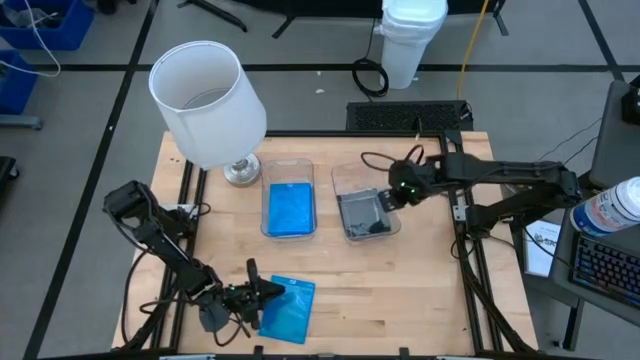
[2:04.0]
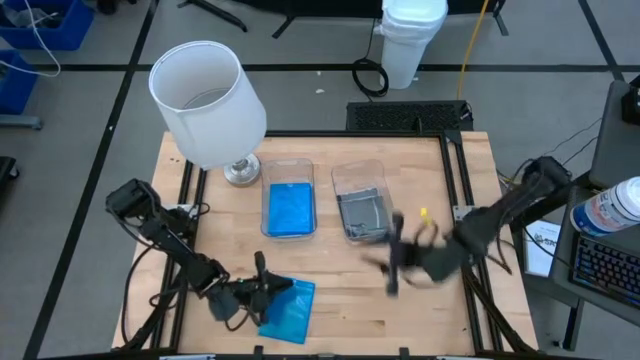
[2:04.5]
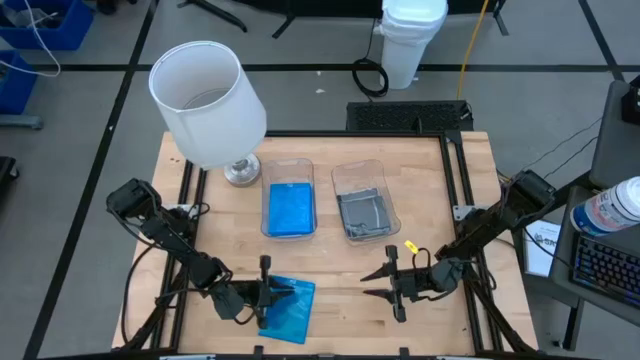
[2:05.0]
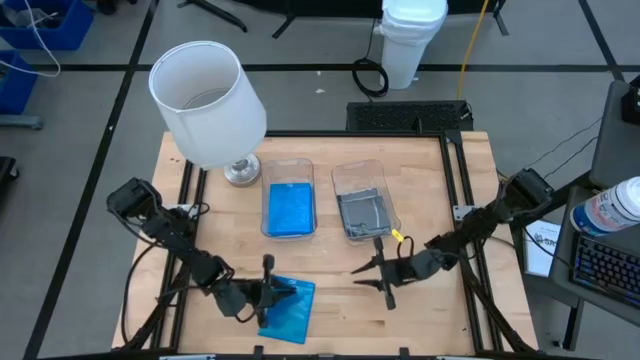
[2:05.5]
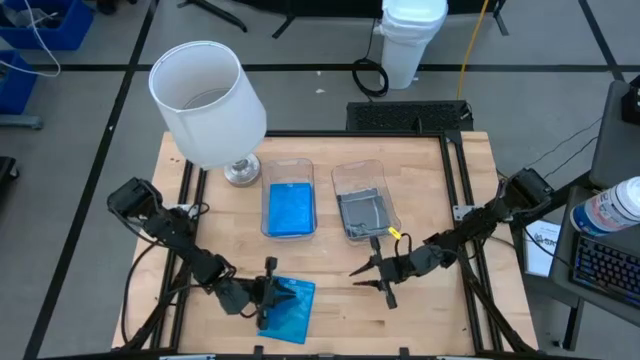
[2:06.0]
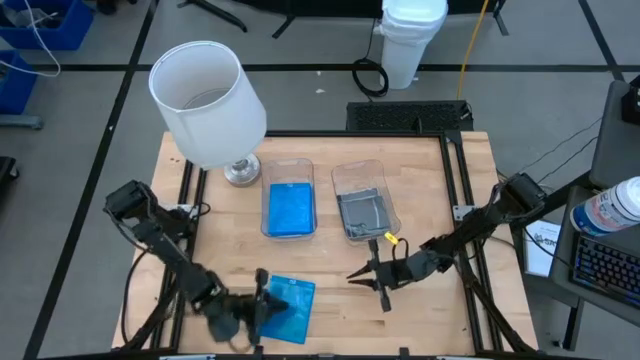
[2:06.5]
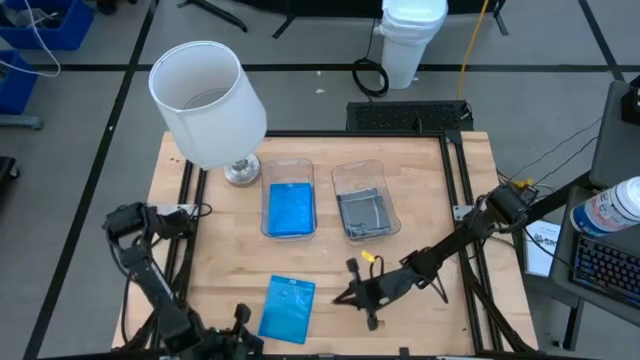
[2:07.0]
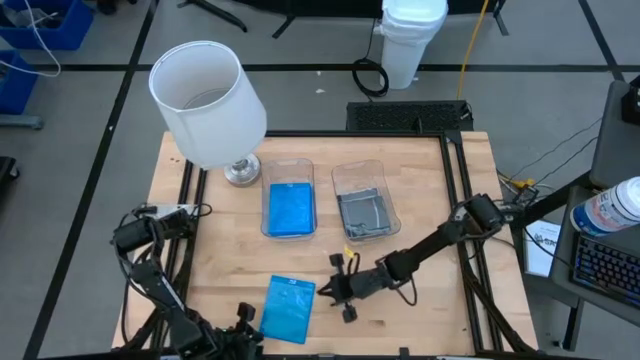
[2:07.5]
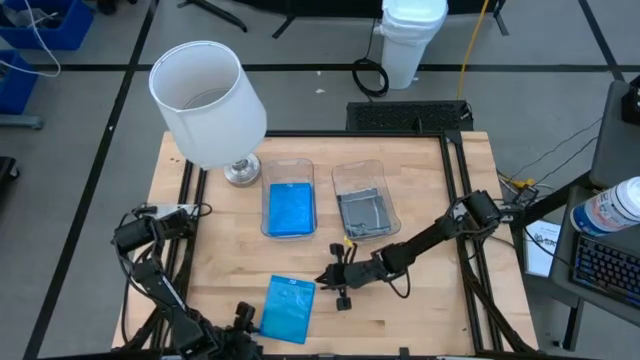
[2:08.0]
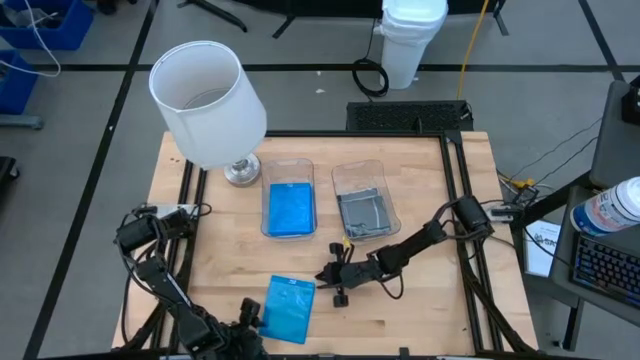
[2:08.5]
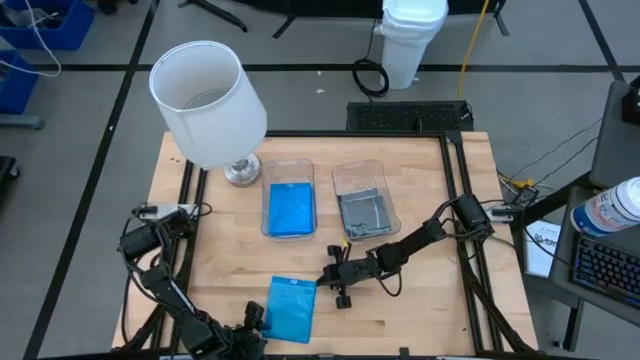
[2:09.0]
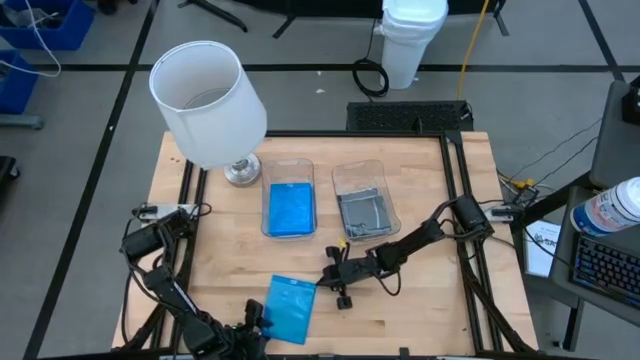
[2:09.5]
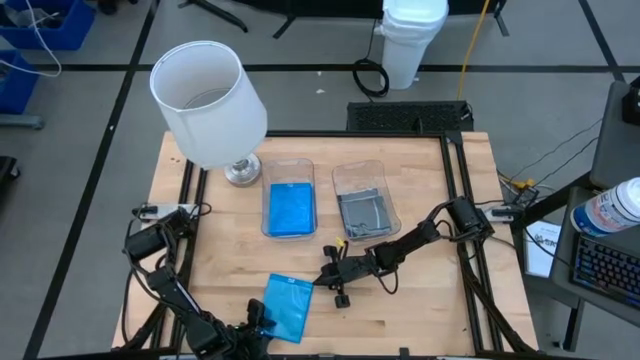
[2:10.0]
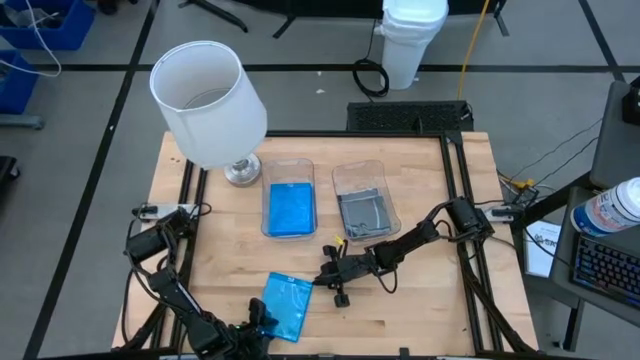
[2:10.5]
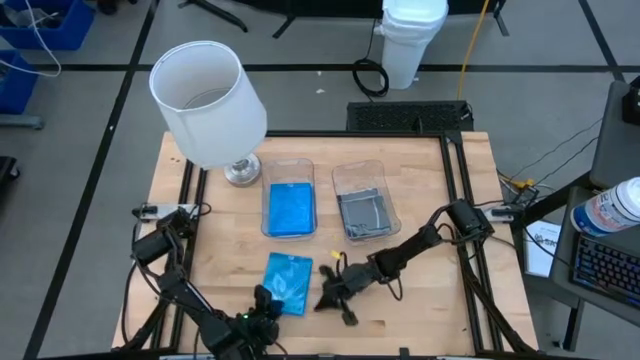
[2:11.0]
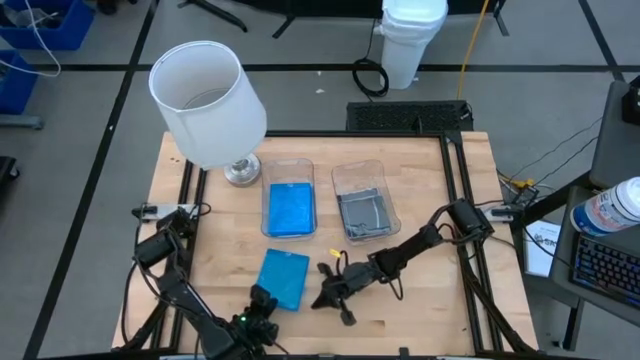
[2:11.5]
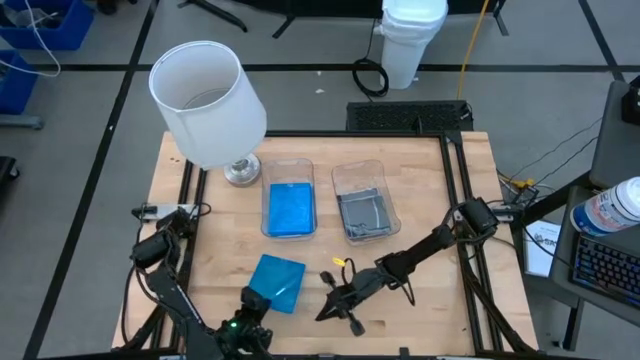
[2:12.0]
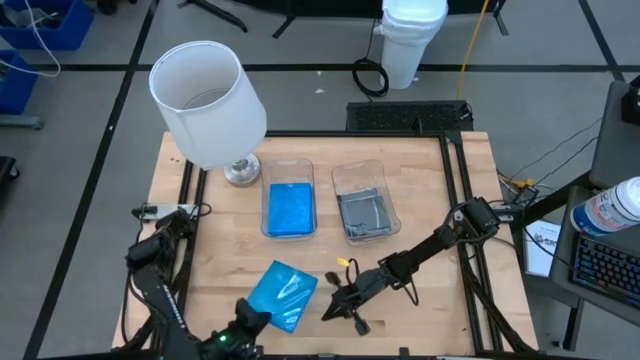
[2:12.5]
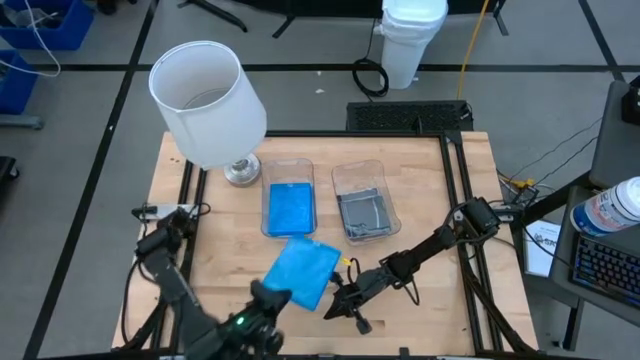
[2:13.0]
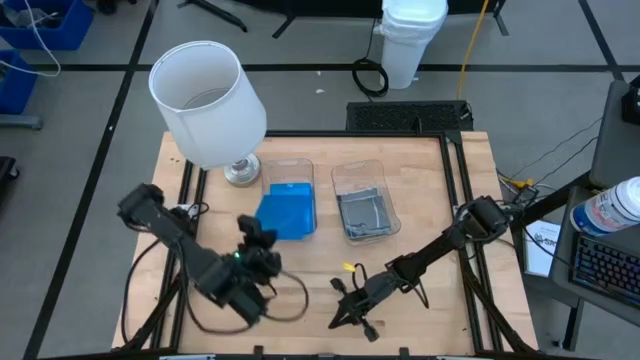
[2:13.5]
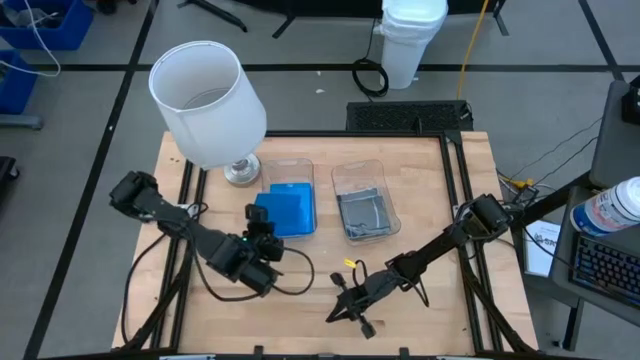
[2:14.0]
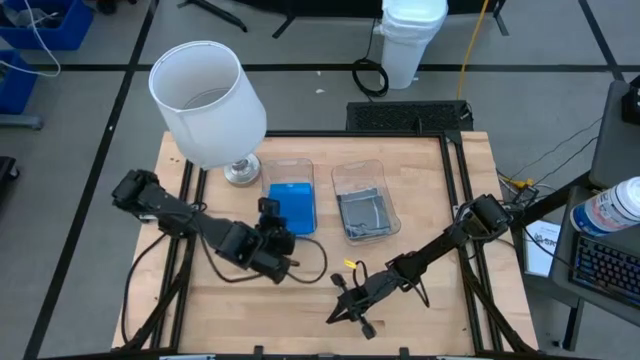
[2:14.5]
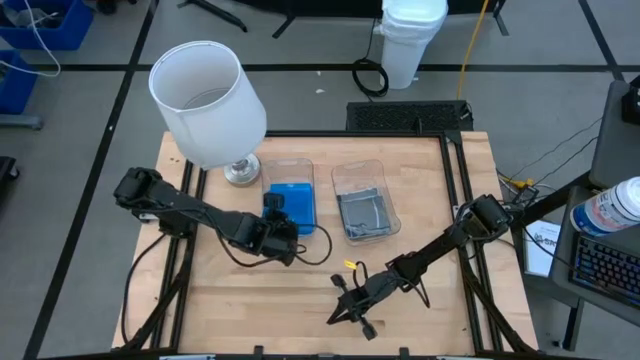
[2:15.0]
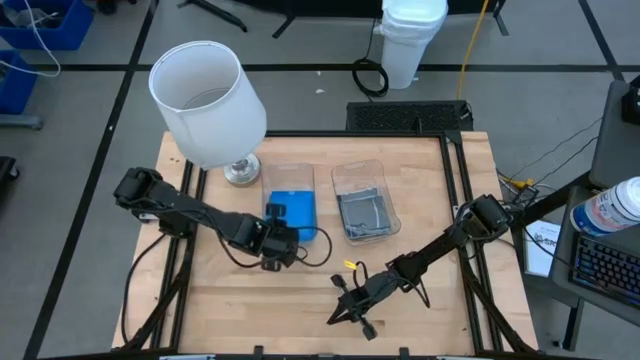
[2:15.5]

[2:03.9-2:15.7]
Task: Pick & place jewel cases by type
Put the blue CD case into the left transparent bin

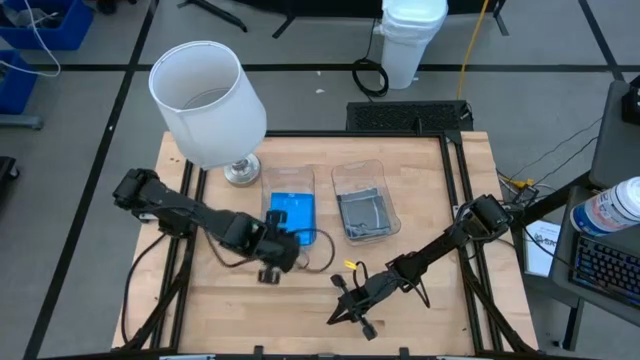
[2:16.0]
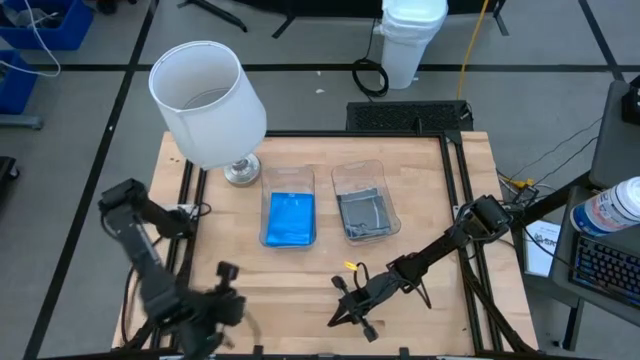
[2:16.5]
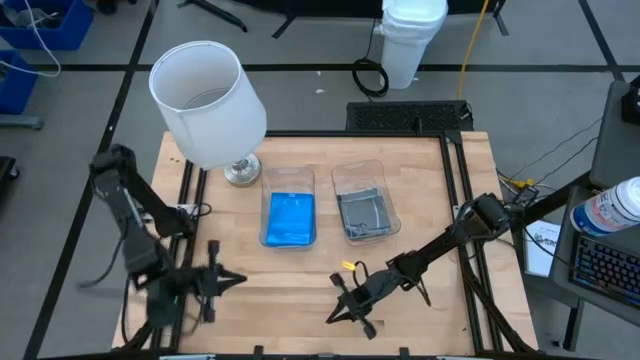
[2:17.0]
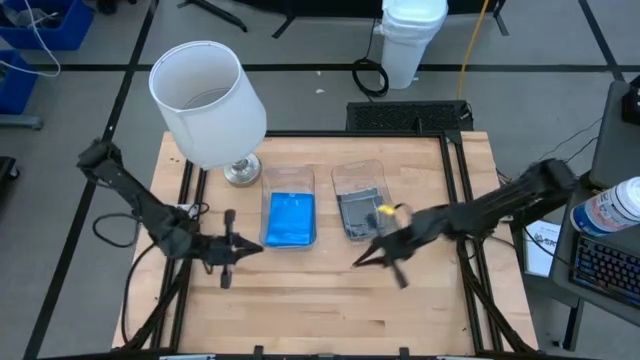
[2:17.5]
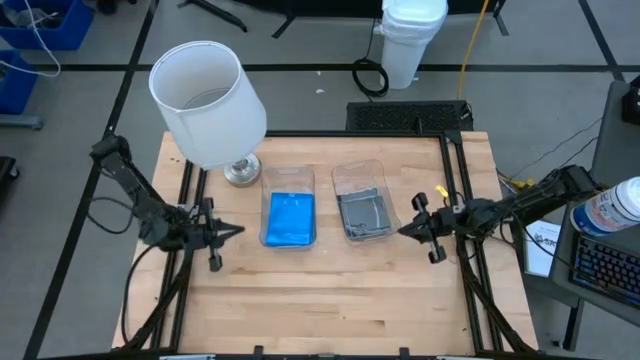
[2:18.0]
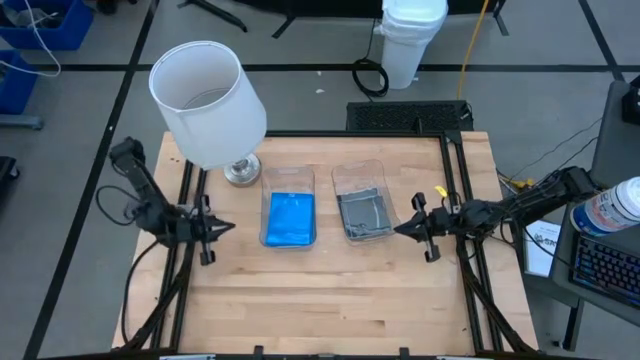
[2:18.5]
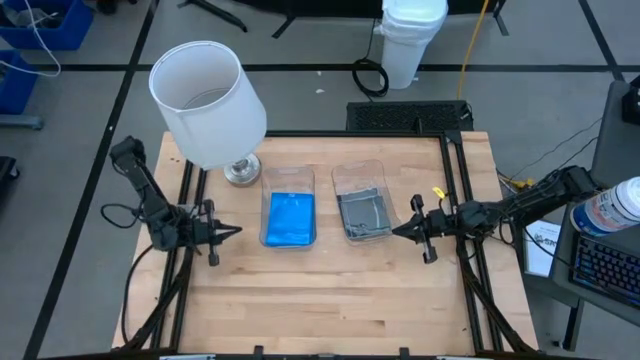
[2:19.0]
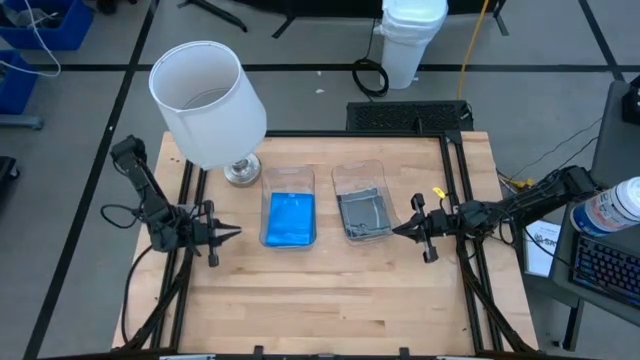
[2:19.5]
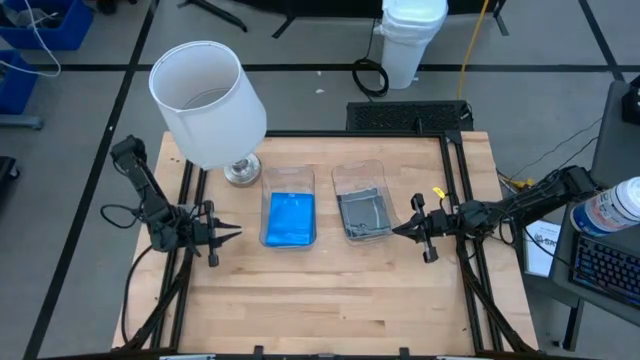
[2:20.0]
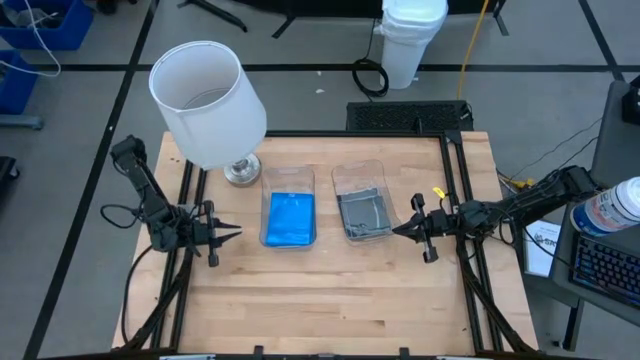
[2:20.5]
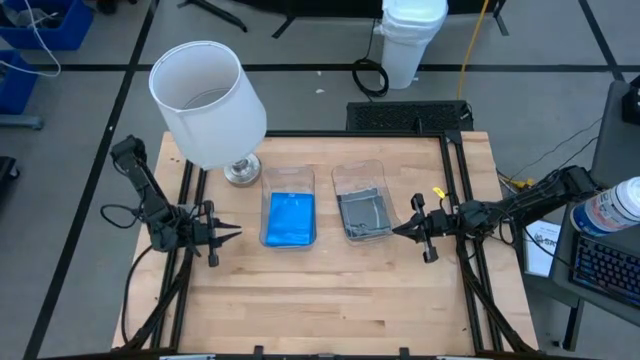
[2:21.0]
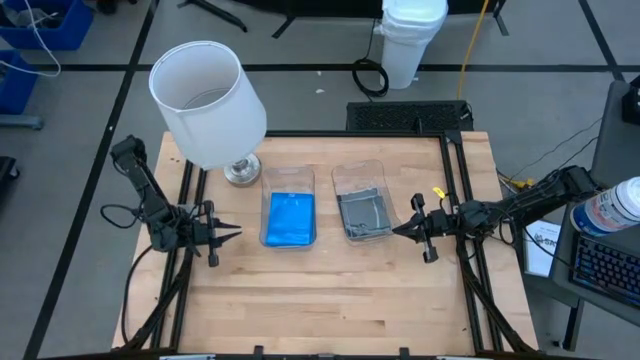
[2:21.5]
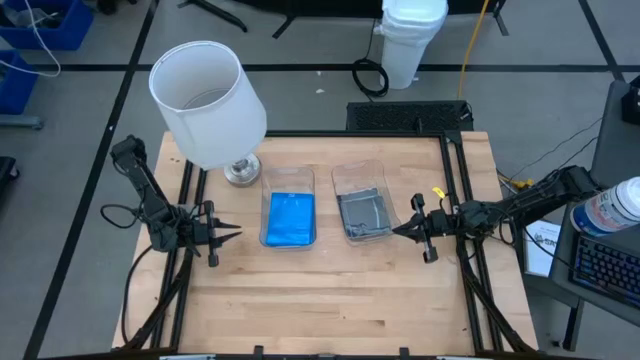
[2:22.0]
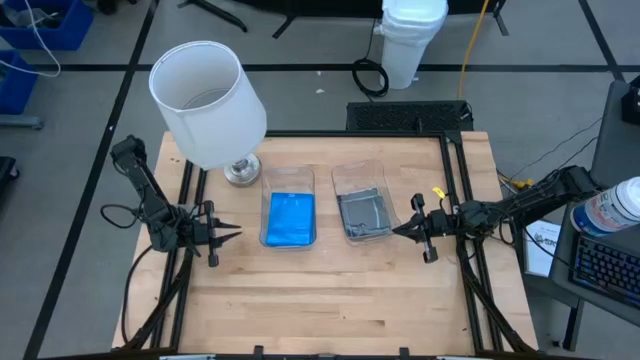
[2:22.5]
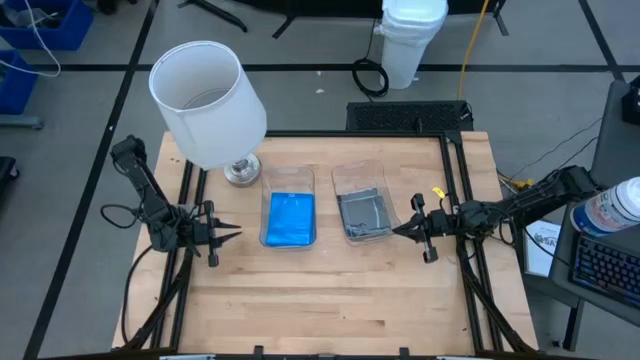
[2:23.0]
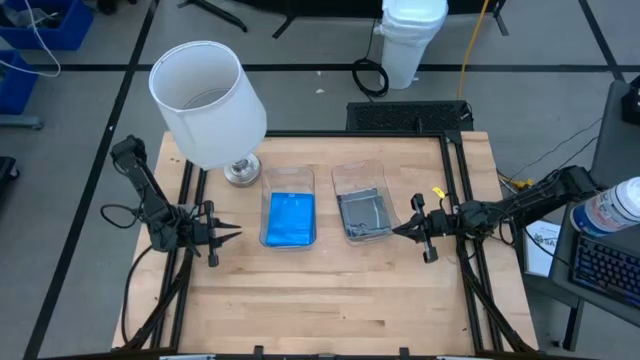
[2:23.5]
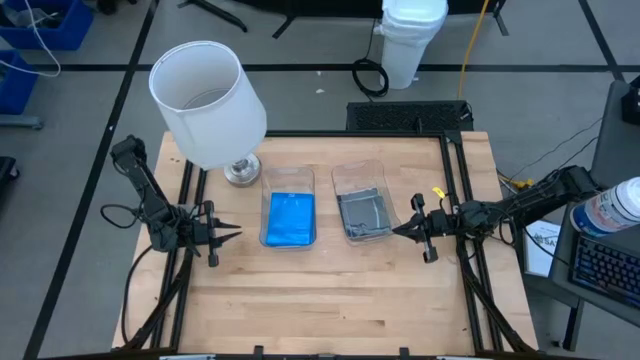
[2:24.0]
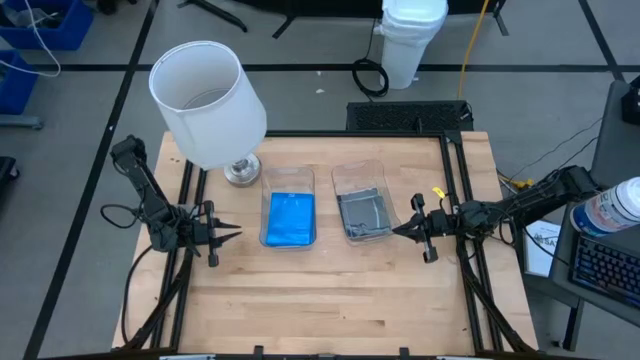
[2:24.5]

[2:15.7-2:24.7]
Return to Home Position

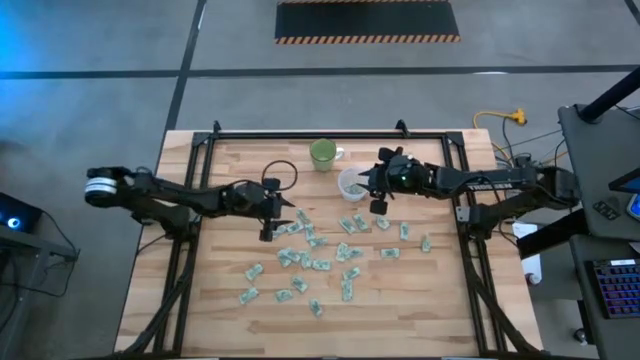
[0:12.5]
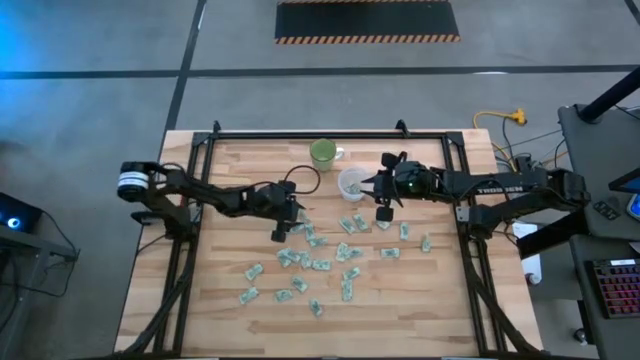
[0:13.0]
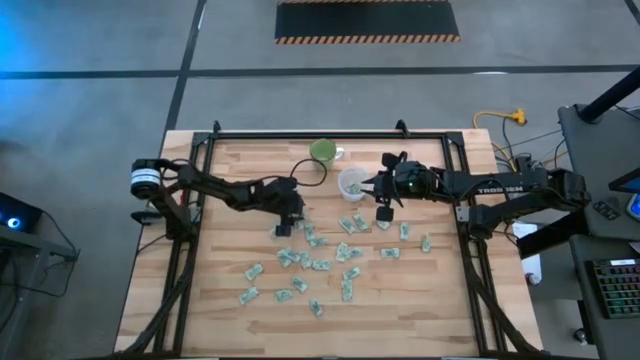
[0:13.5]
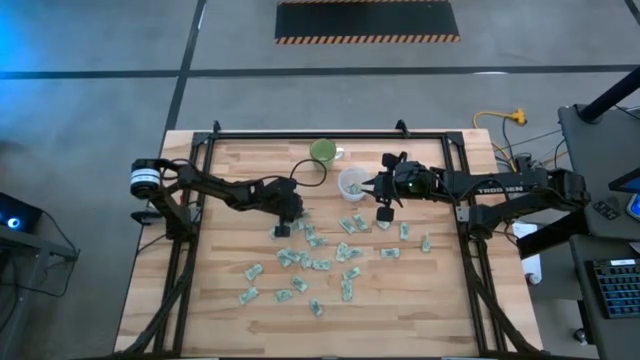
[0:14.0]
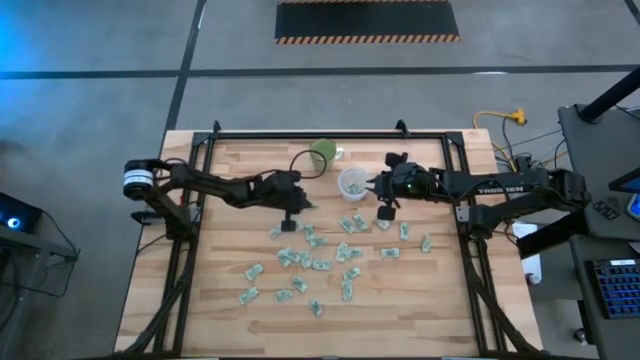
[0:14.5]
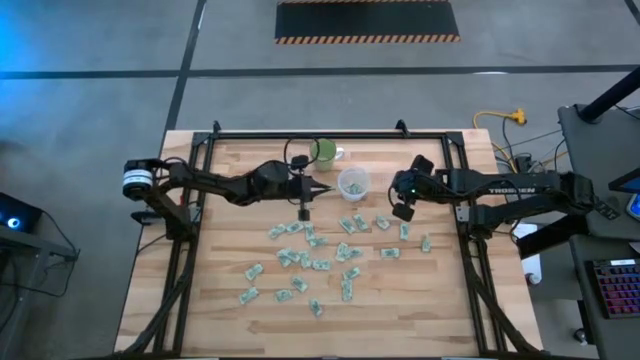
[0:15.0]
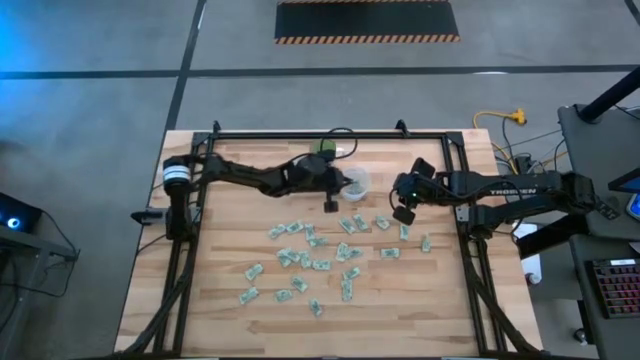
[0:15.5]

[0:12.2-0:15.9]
Task: Pick and place Stevia / Truvia into bins
Put the stevia packet into the transparent container
